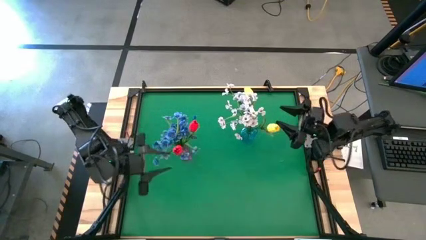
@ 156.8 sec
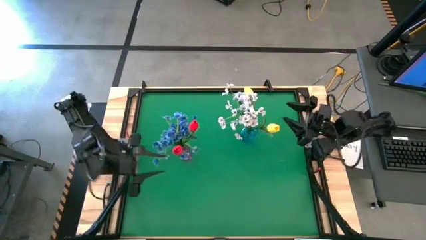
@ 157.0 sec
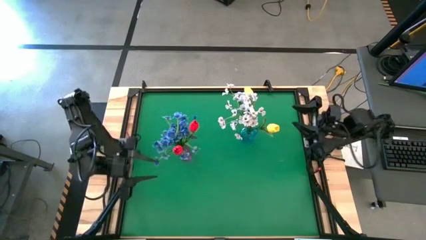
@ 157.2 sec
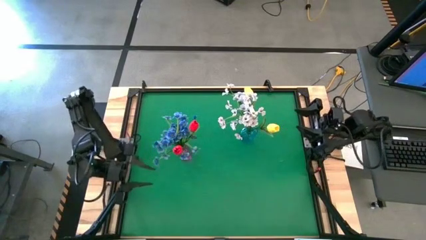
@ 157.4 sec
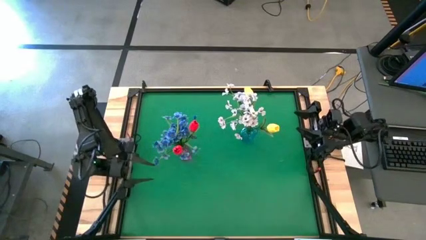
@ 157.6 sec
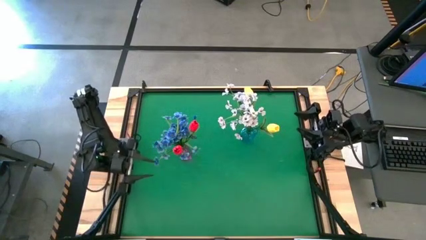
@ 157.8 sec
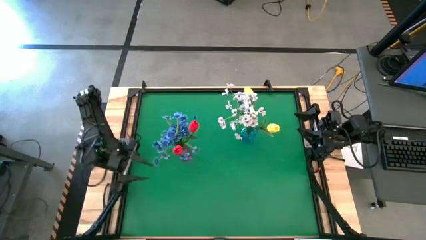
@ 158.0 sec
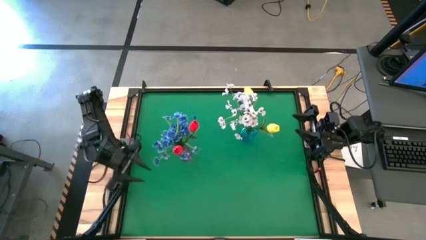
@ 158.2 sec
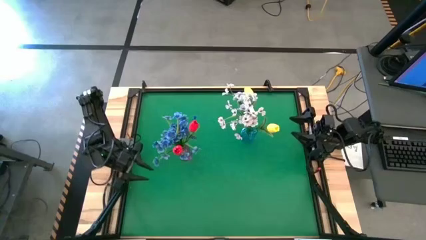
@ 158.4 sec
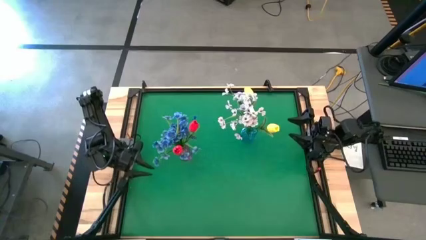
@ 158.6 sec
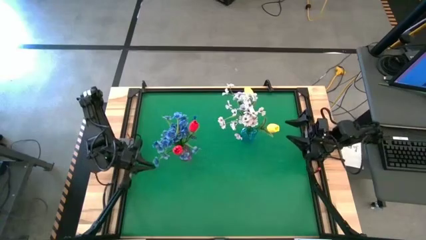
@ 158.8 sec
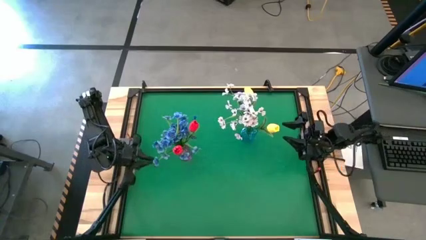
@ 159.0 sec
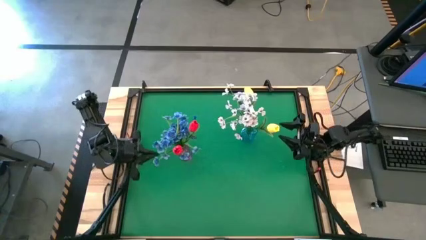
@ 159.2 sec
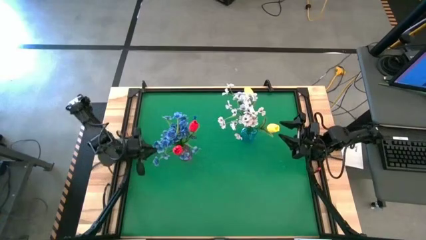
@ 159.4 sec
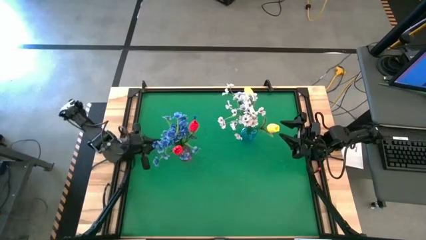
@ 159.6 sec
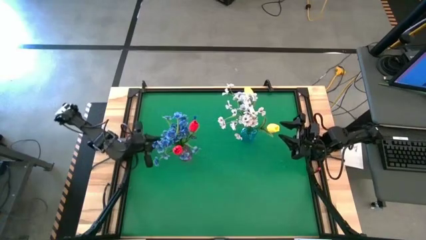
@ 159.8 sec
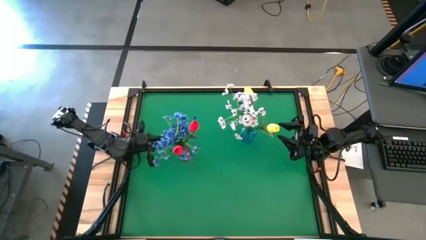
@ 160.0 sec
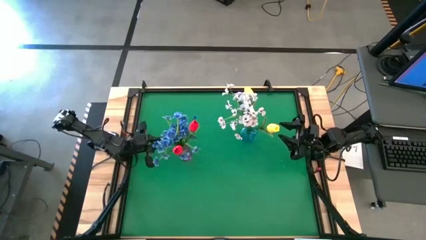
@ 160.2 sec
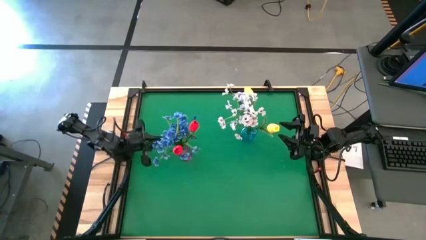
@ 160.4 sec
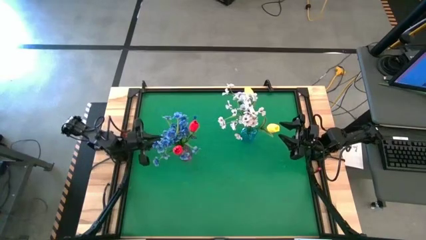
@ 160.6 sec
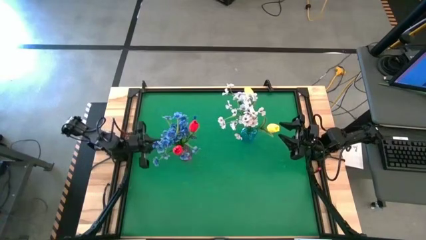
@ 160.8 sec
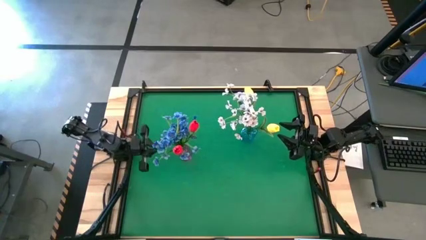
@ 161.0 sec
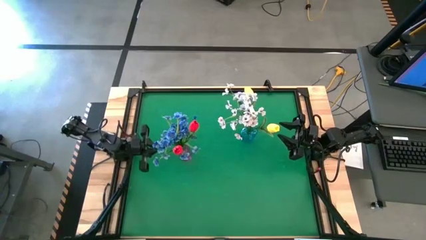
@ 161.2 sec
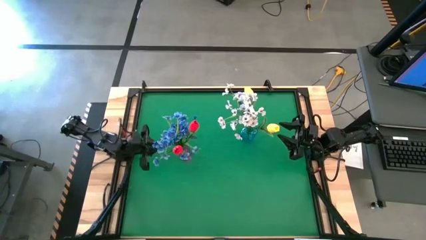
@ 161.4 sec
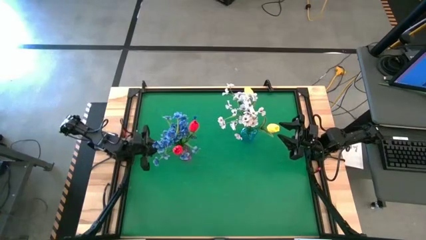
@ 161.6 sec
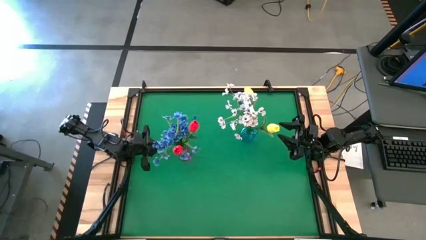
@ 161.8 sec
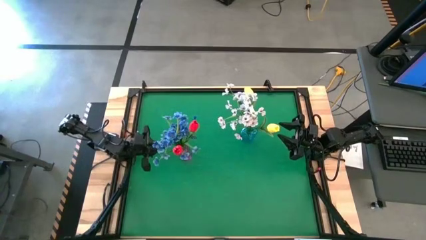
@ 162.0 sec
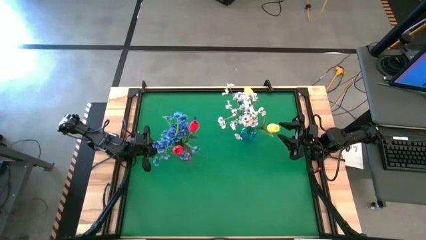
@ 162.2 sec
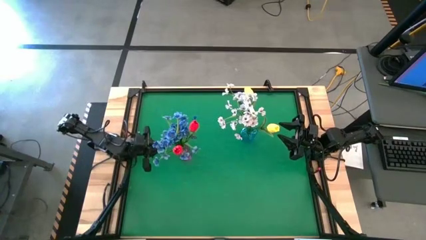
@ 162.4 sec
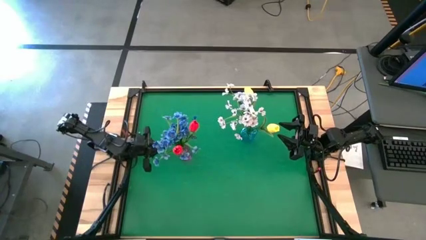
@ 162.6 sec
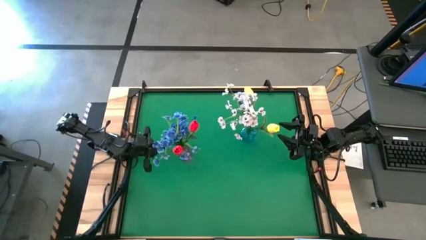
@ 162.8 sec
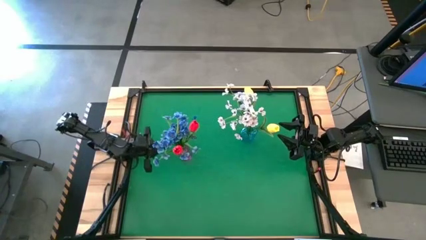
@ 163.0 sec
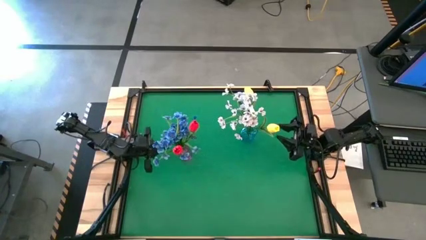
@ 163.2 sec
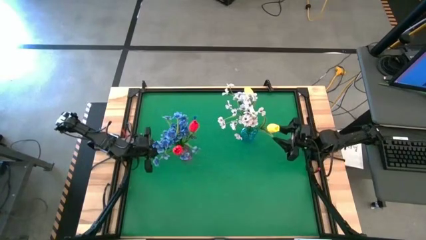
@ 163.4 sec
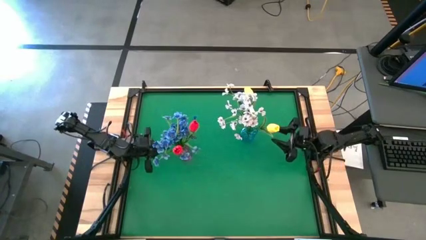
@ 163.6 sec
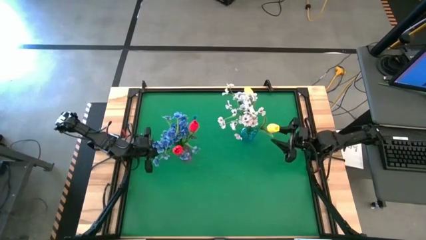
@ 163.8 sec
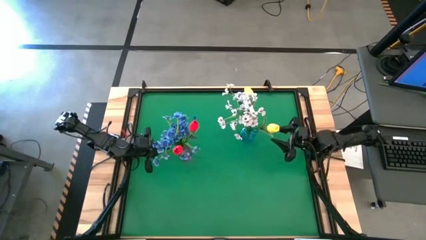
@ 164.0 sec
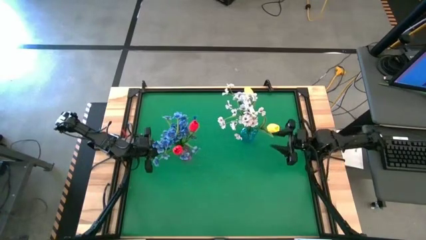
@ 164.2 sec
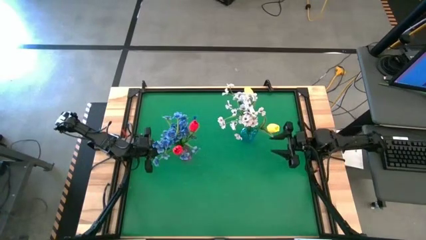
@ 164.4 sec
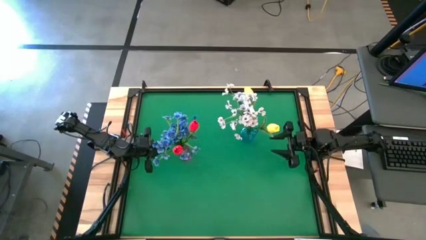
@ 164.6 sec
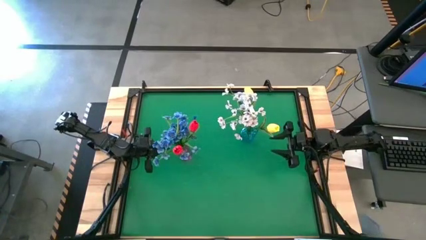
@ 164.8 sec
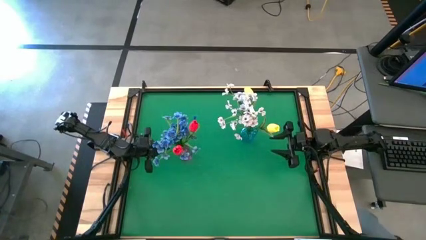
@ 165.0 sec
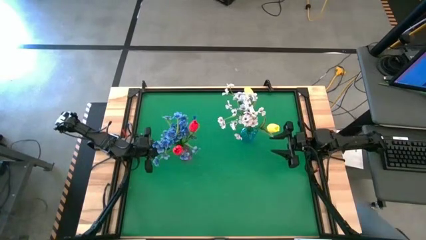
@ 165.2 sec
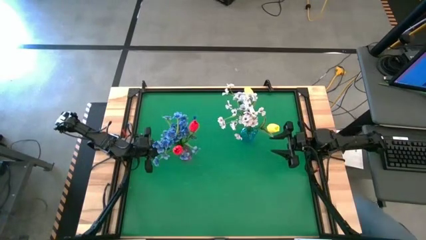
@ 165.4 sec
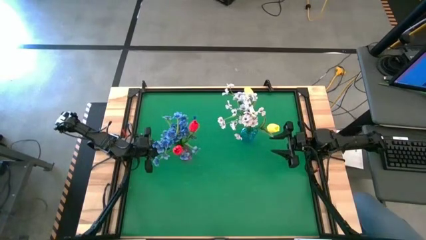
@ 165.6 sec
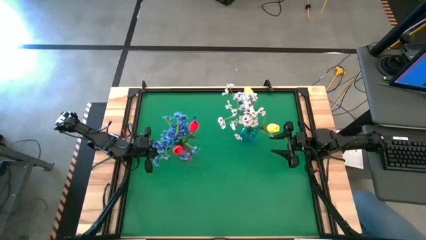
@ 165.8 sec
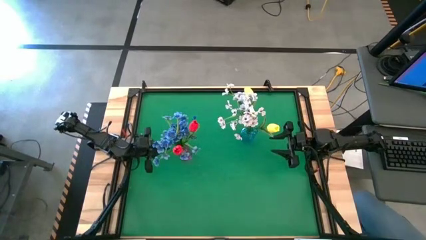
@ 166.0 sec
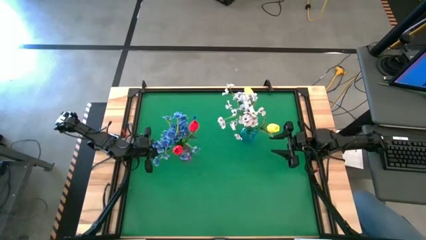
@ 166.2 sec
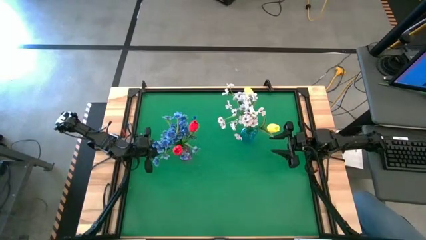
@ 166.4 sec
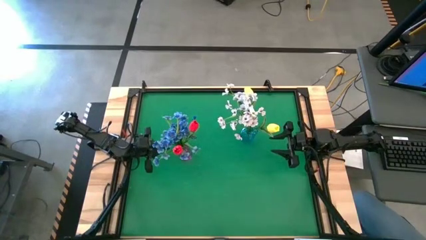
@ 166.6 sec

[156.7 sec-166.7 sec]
Task: Sort flowers into vase by color
Return to Home Position
